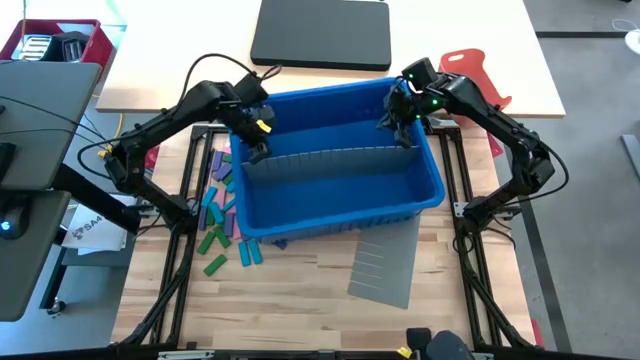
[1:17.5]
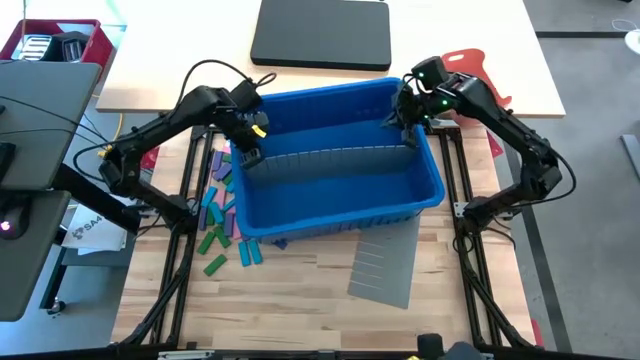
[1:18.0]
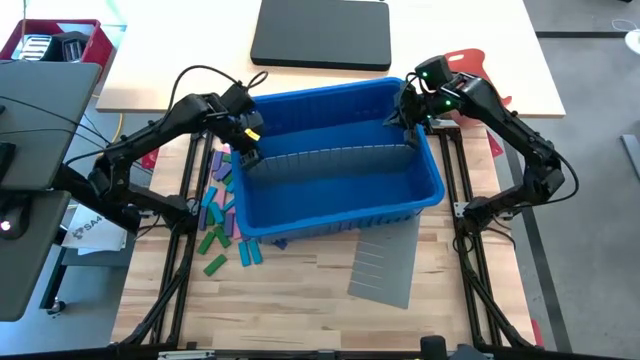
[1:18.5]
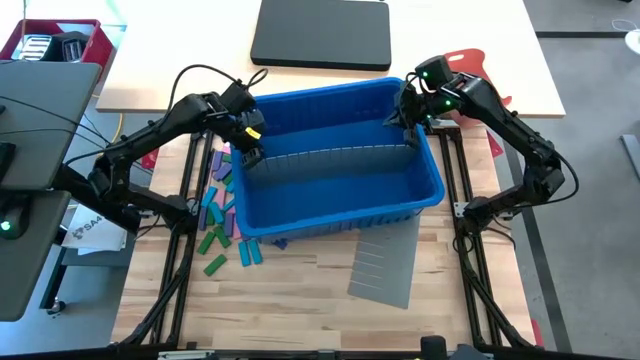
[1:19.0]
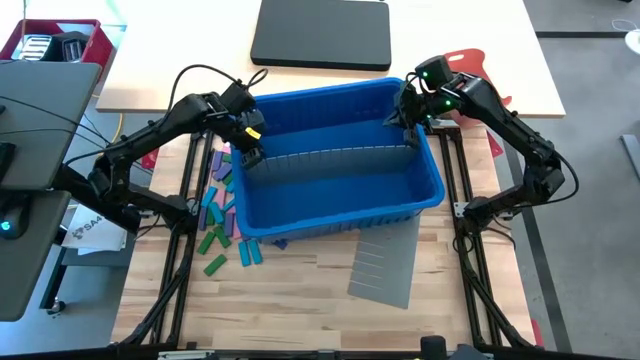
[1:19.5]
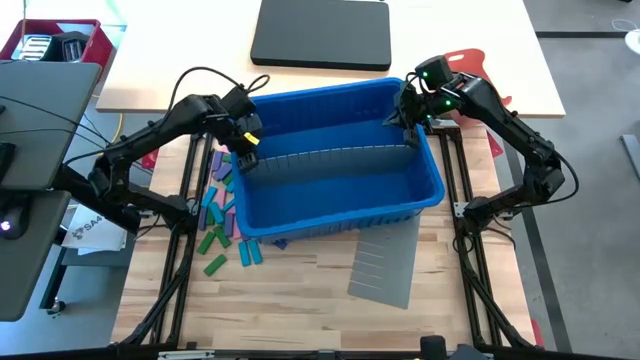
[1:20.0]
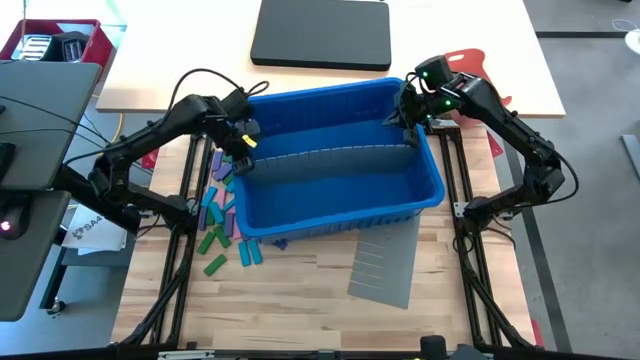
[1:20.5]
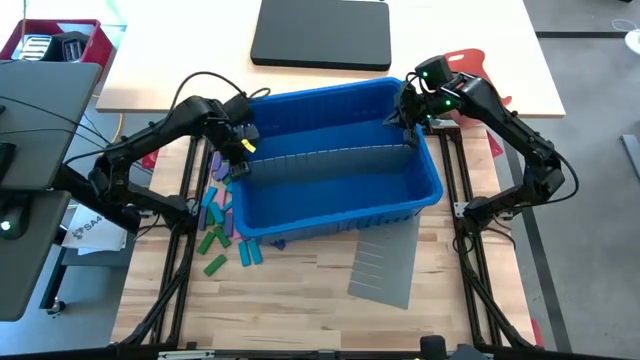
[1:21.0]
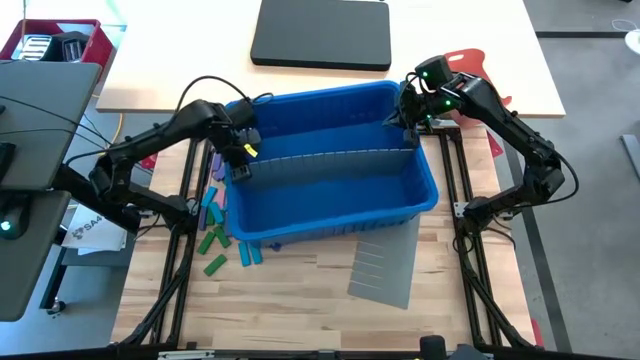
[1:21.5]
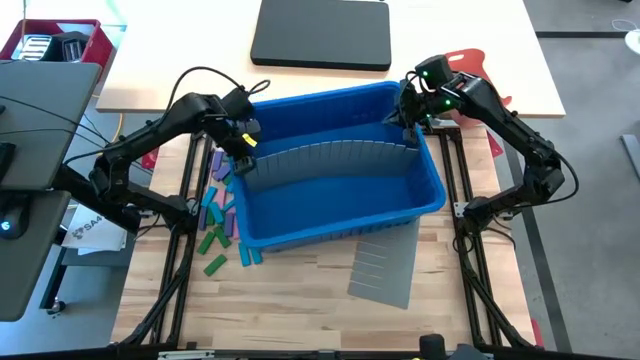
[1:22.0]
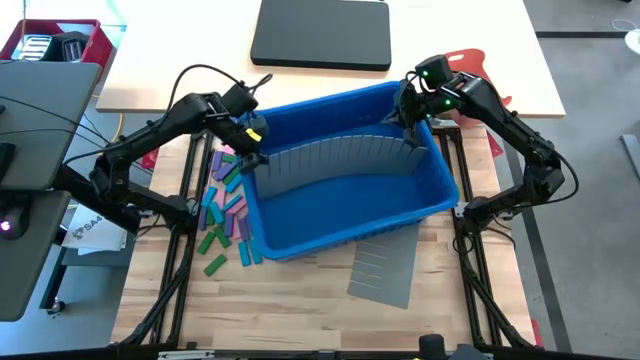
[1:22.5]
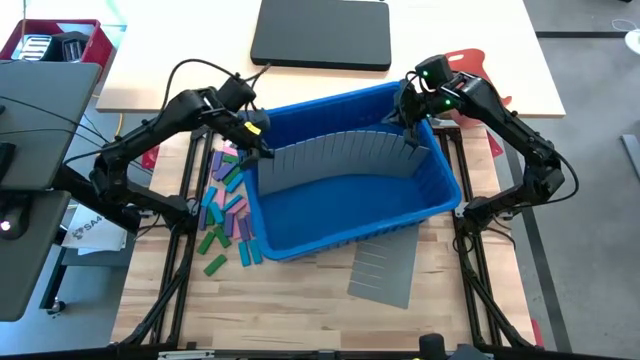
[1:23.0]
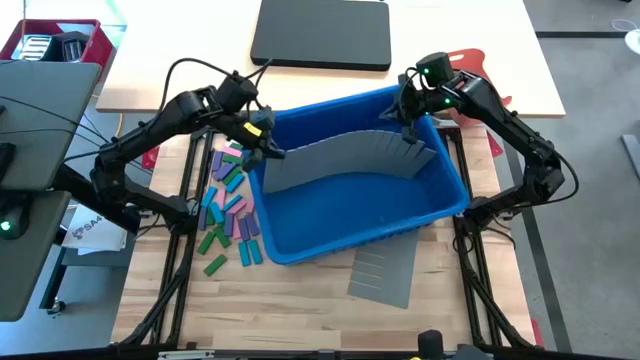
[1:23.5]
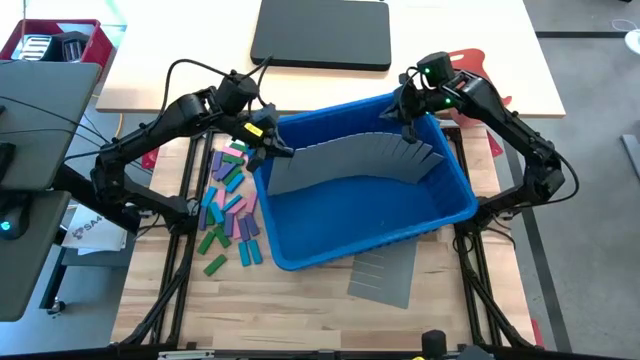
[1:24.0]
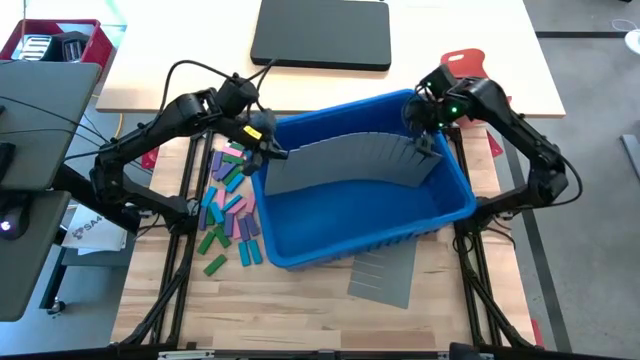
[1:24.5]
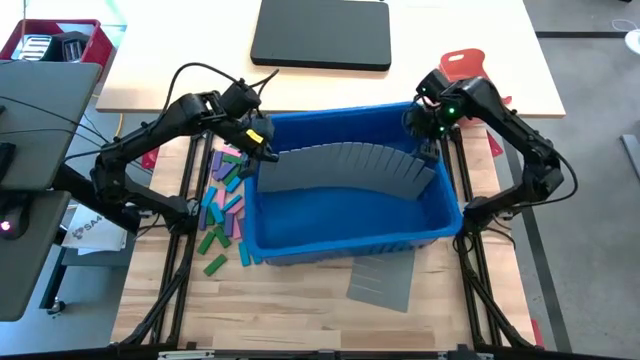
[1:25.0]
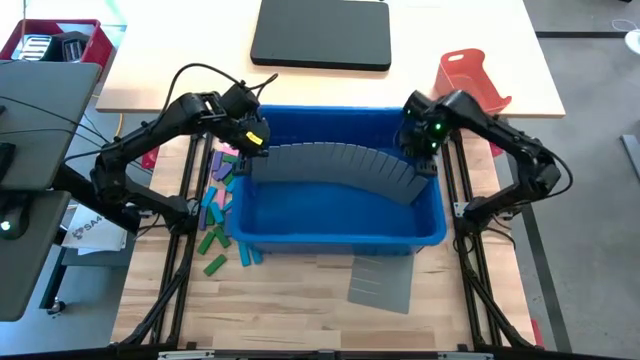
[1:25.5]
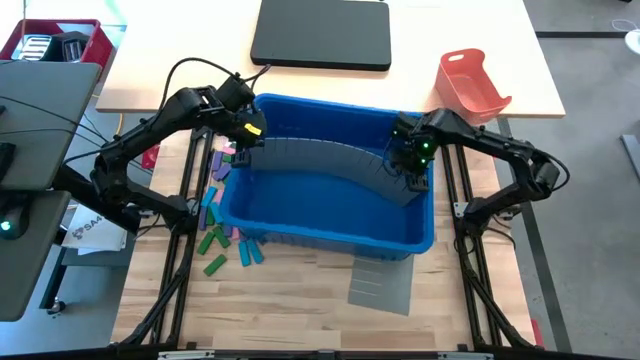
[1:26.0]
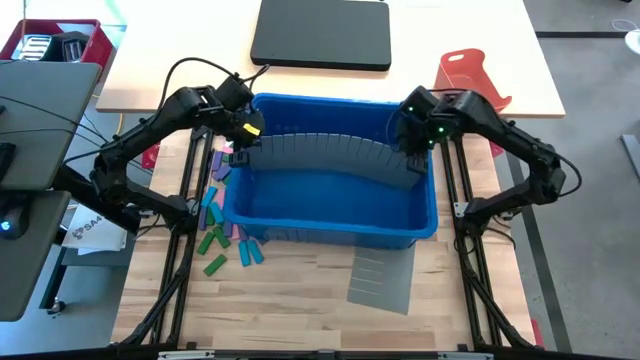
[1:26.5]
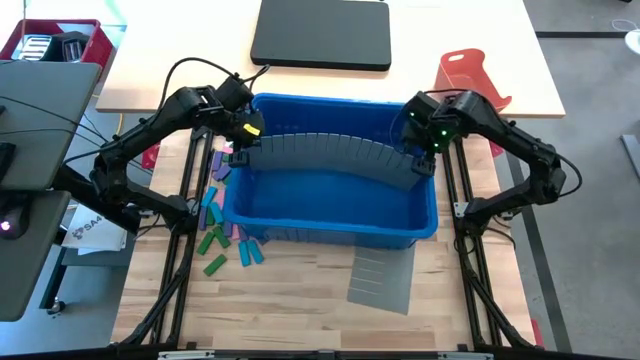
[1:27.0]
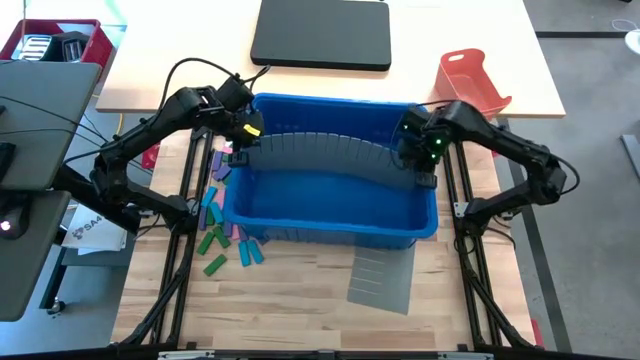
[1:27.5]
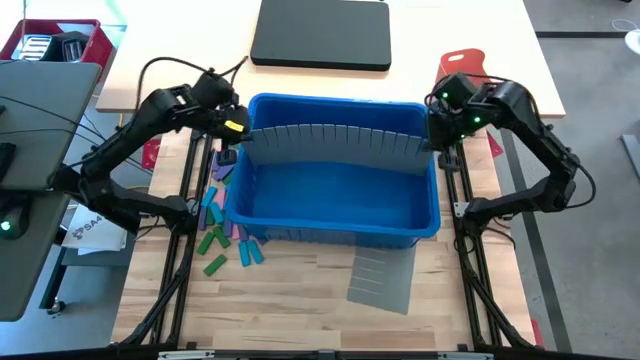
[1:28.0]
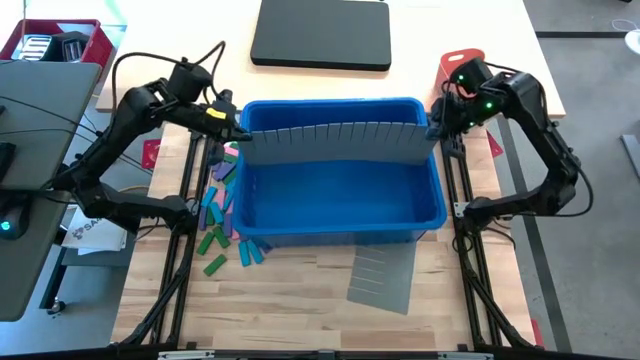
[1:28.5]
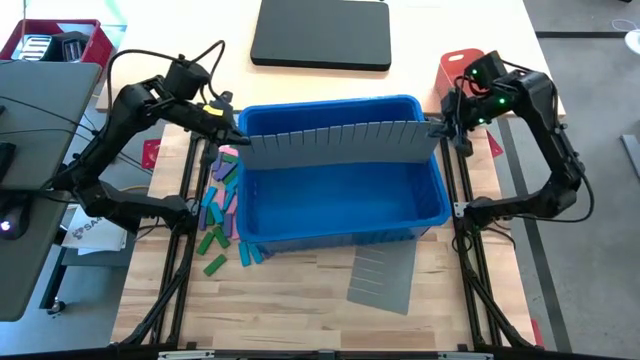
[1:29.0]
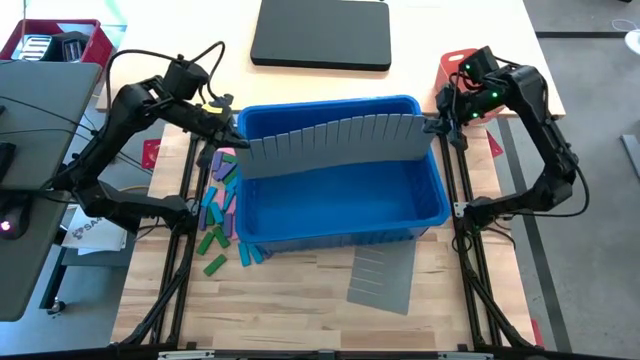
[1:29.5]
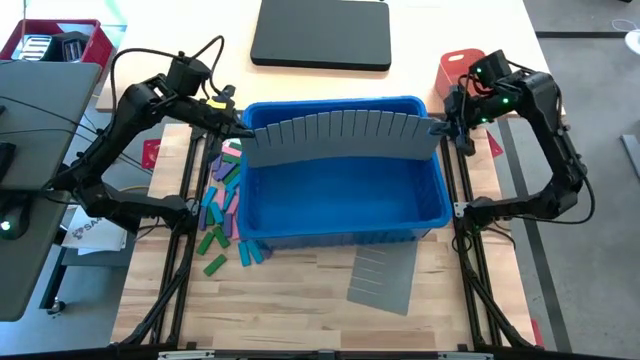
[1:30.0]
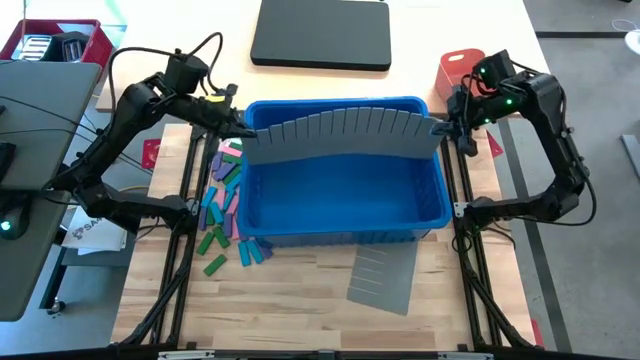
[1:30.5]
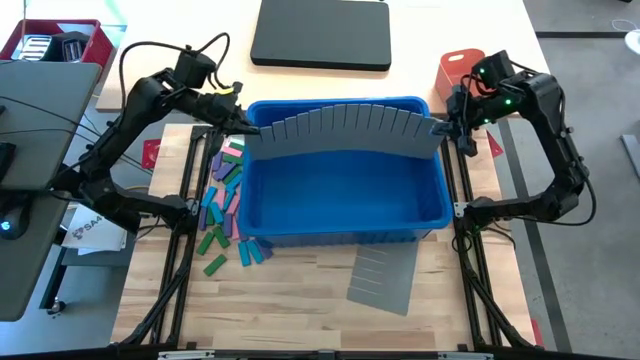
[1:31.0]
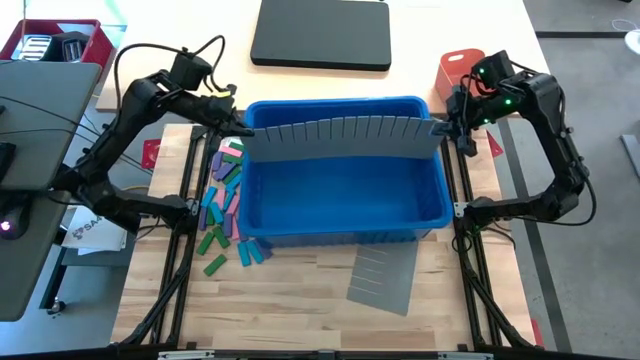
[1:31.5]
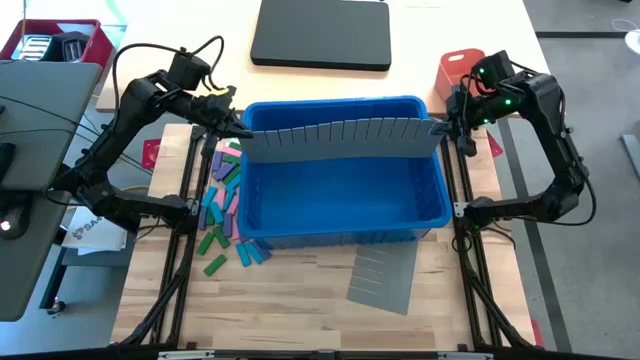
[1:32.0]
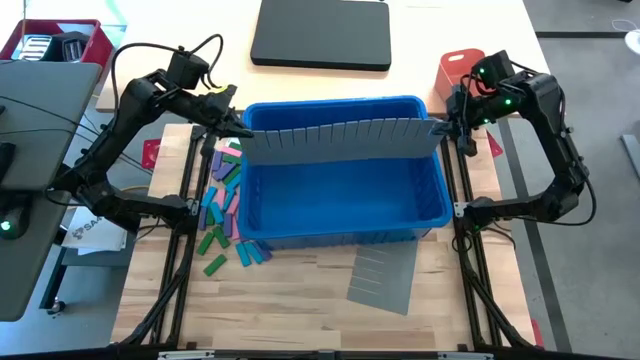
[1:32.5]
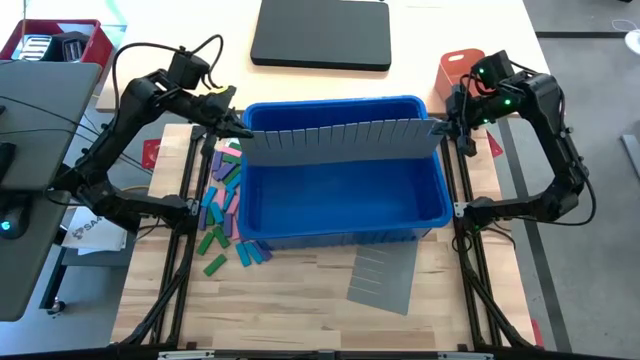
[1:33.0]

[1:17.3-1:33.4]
Task: Sort blocks
Insert the bin divider into the blue bin

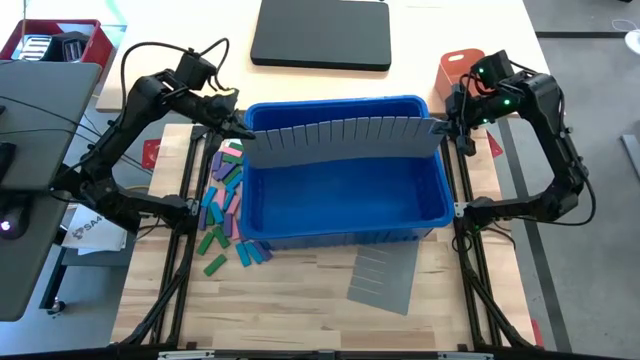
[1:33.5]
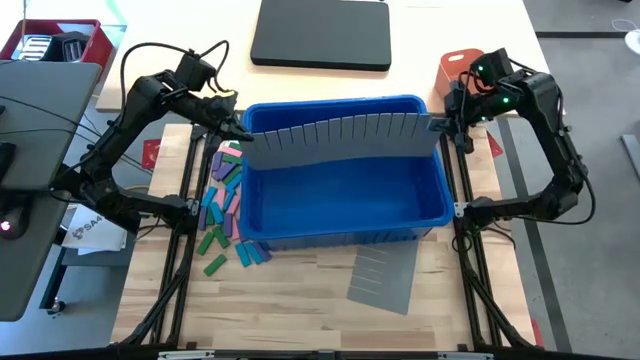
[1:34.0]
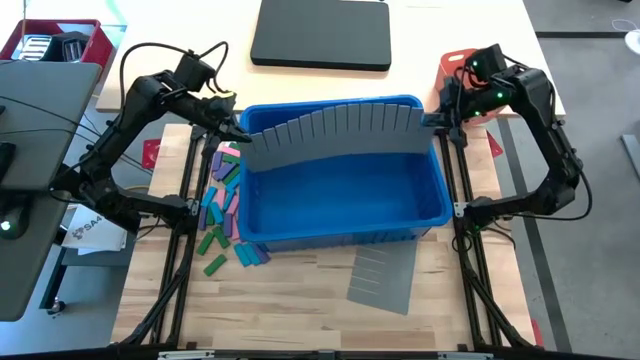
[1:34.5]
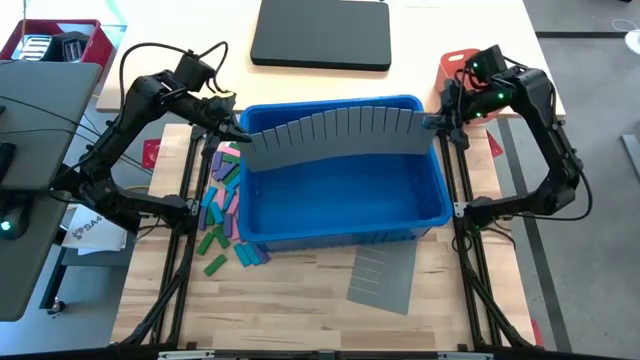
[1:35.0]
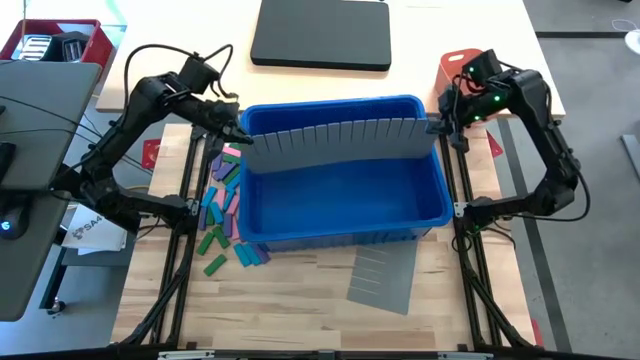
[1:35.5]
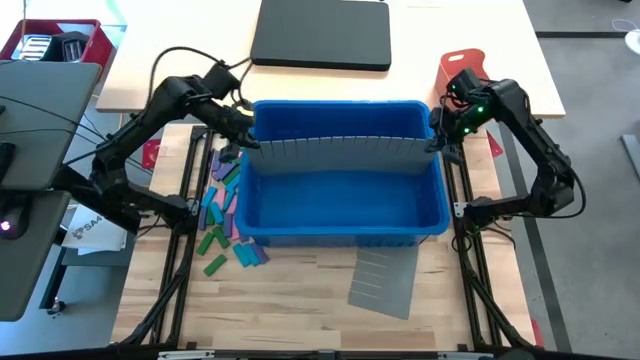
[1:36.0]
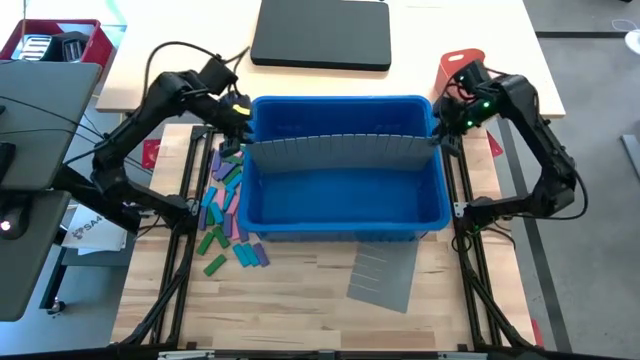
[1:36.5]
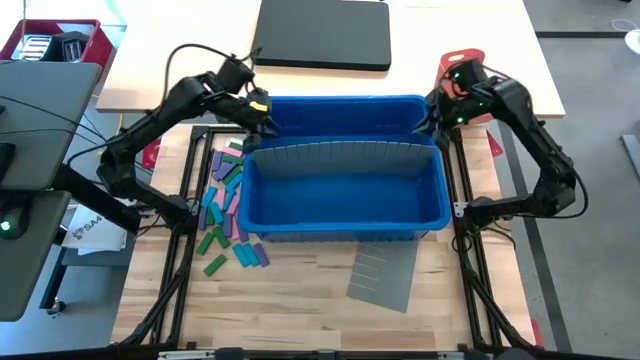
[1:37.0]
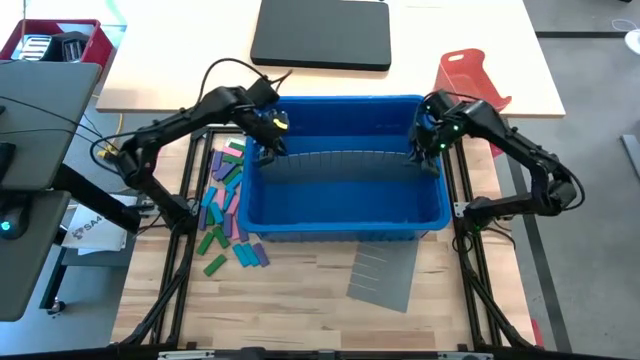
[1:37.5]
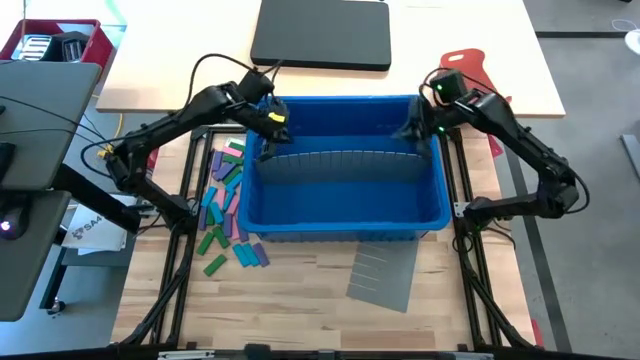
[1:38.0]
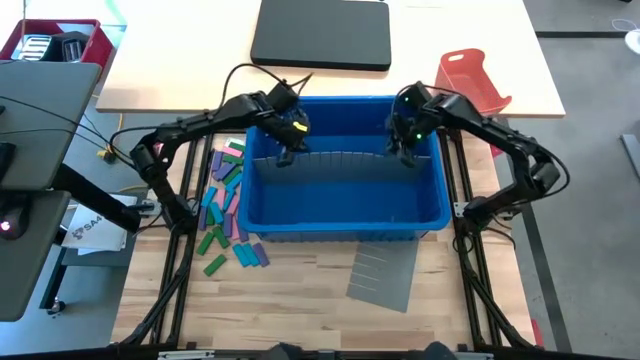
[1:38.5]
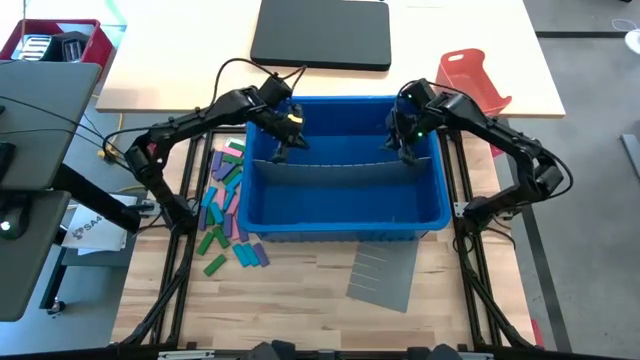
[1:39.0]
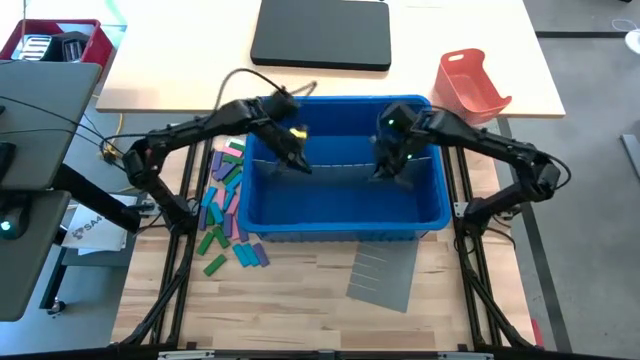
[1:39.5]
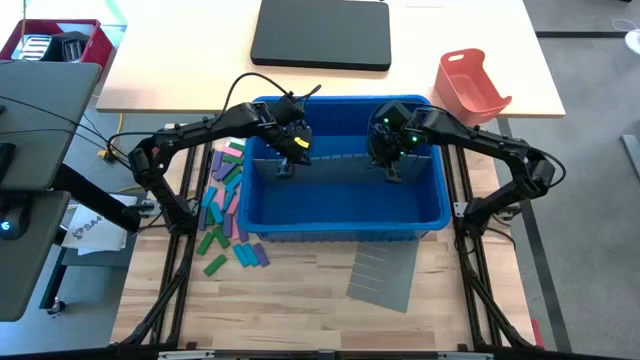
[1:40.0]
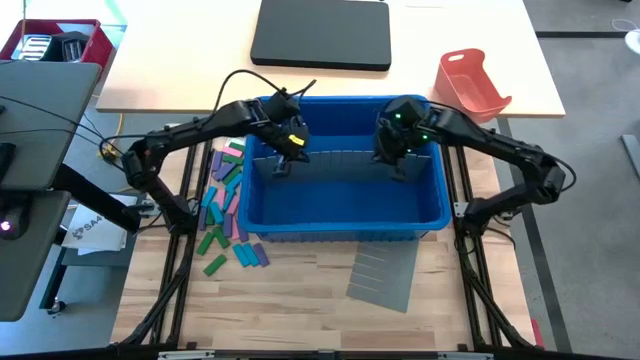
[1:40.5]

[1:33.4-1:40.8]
Insert the bin divider into the blue bin
